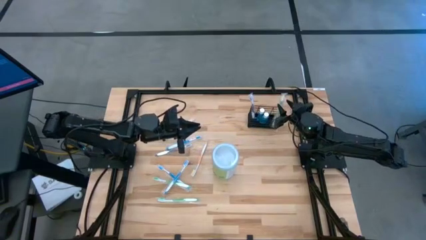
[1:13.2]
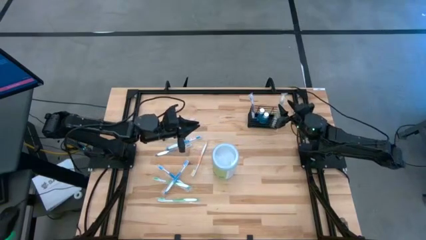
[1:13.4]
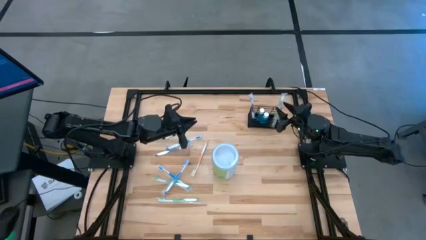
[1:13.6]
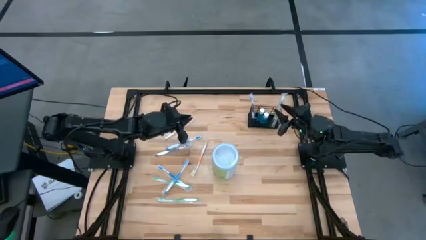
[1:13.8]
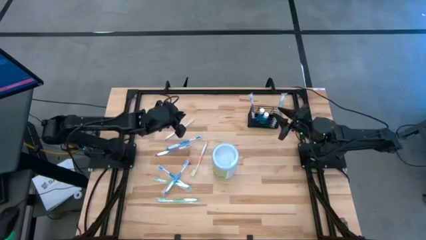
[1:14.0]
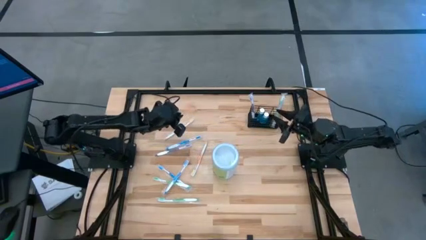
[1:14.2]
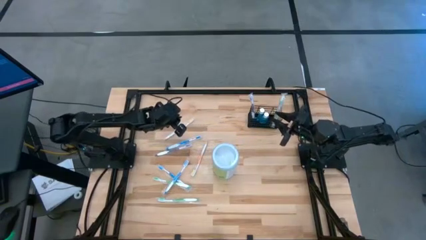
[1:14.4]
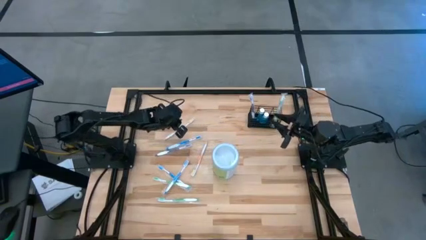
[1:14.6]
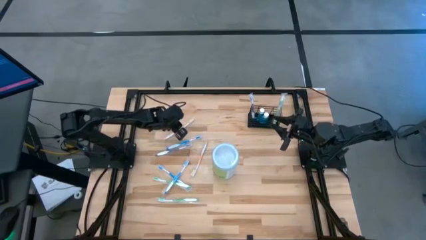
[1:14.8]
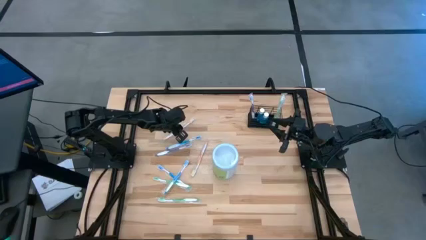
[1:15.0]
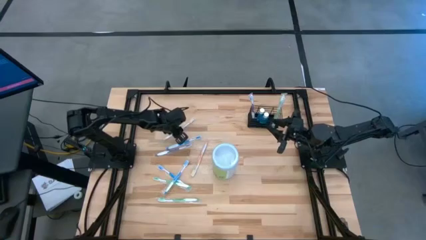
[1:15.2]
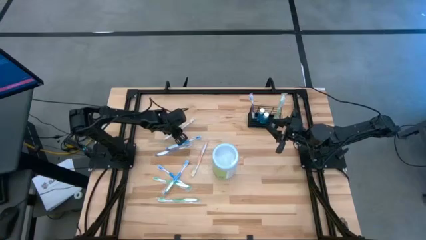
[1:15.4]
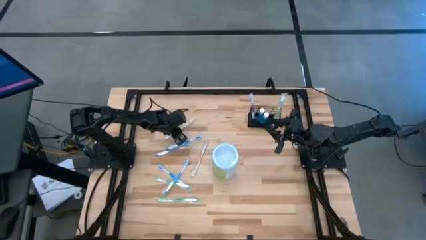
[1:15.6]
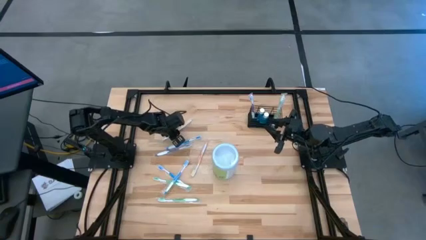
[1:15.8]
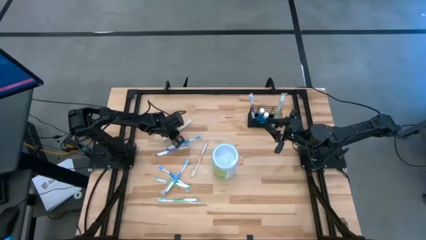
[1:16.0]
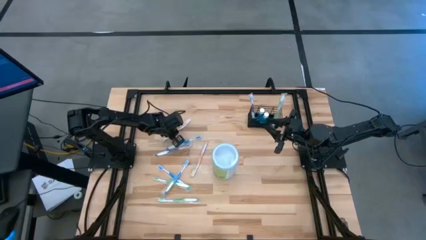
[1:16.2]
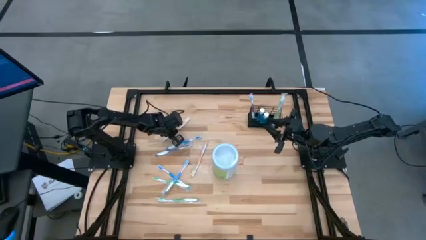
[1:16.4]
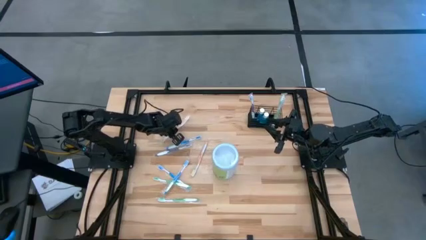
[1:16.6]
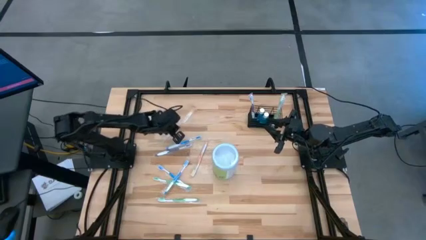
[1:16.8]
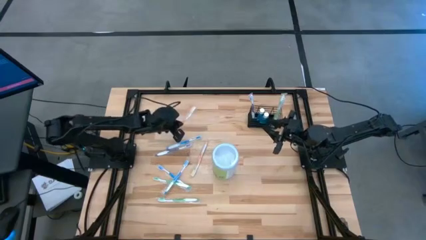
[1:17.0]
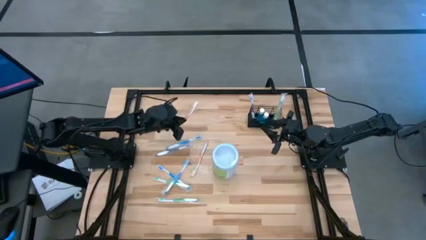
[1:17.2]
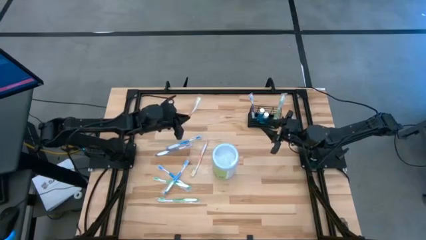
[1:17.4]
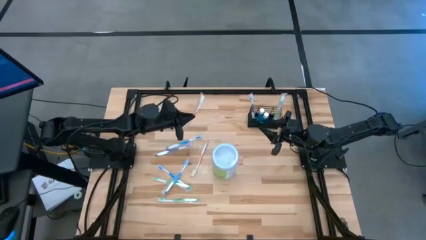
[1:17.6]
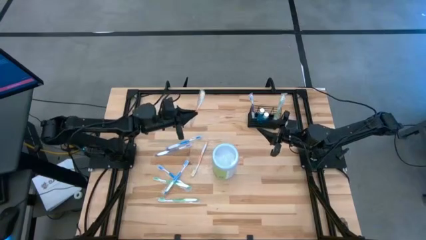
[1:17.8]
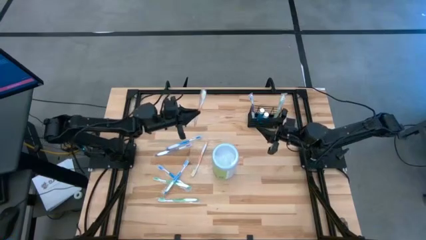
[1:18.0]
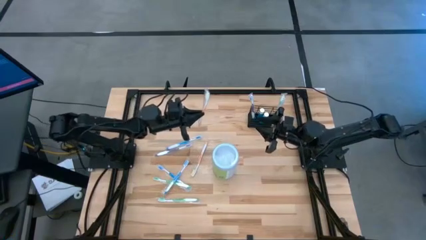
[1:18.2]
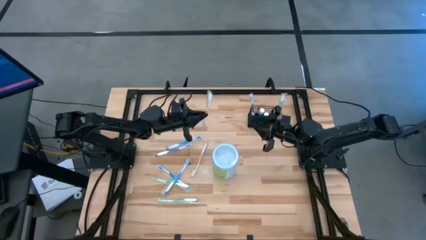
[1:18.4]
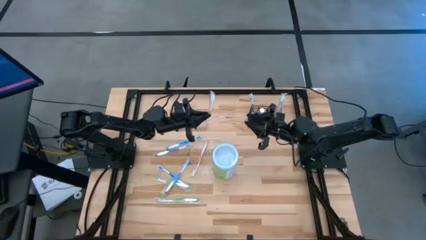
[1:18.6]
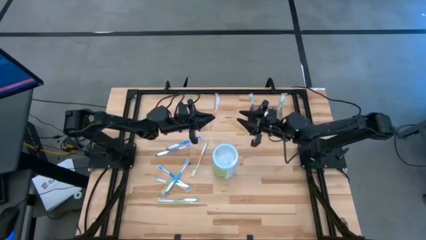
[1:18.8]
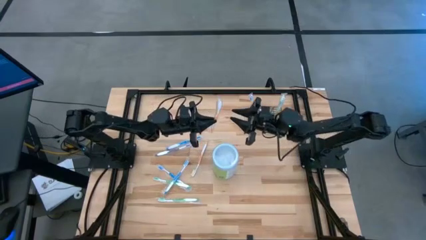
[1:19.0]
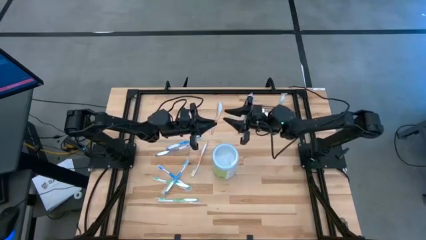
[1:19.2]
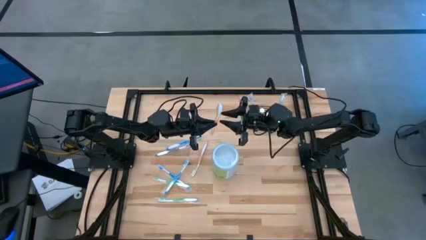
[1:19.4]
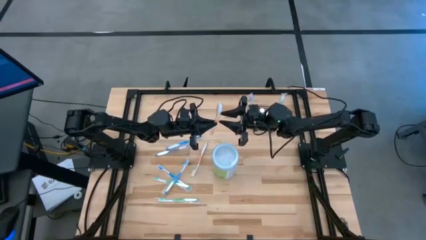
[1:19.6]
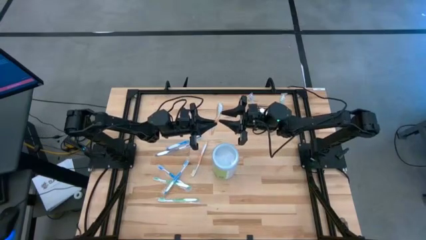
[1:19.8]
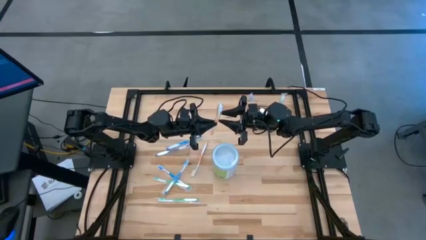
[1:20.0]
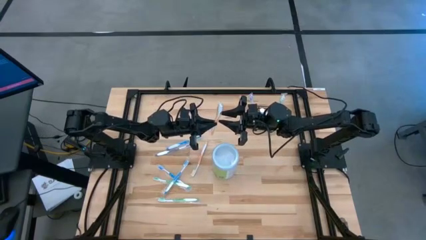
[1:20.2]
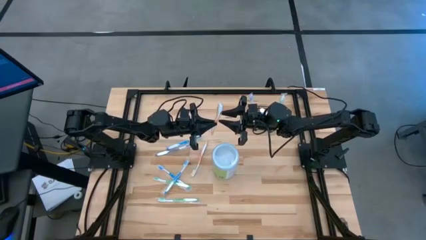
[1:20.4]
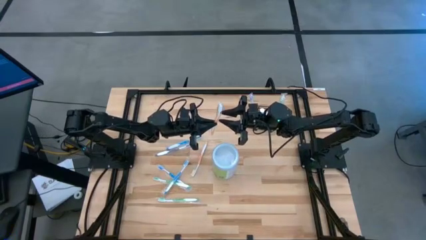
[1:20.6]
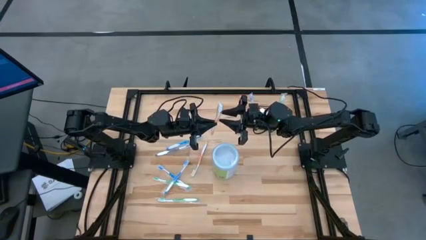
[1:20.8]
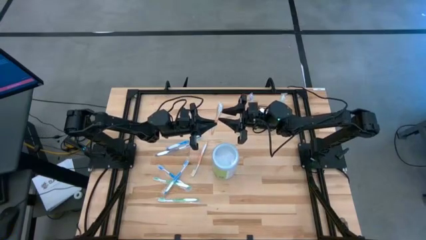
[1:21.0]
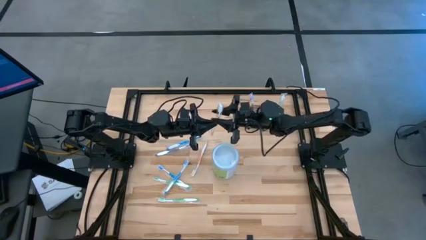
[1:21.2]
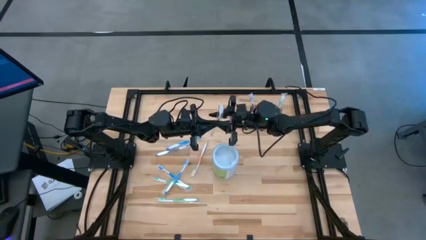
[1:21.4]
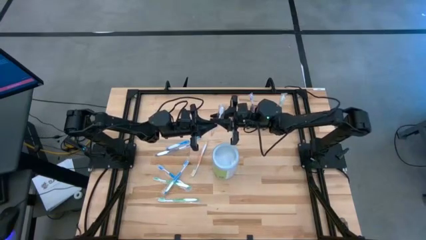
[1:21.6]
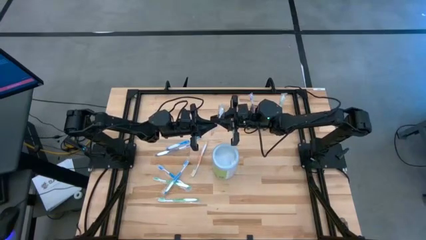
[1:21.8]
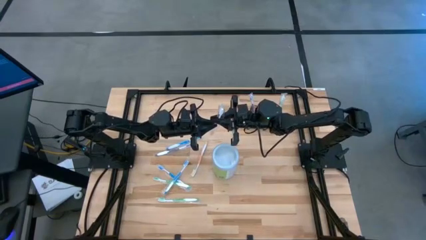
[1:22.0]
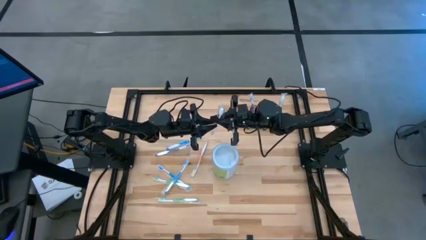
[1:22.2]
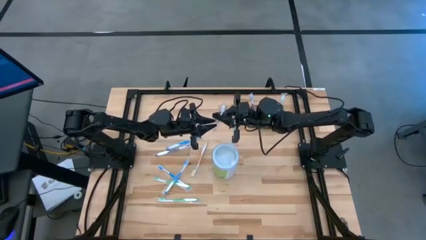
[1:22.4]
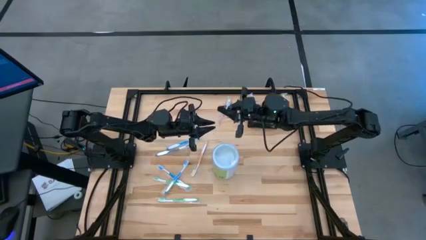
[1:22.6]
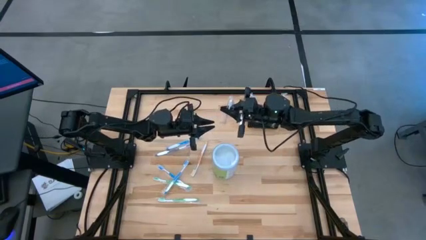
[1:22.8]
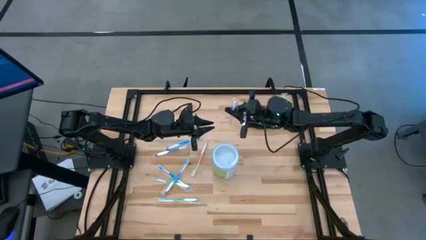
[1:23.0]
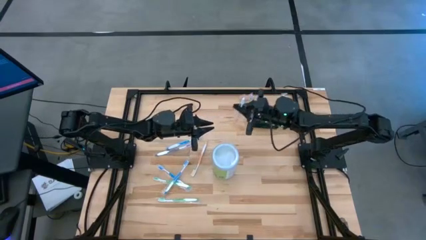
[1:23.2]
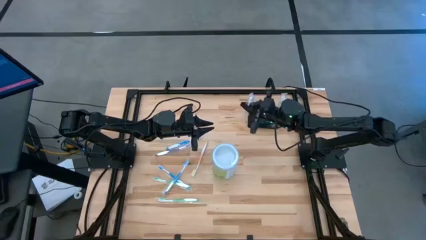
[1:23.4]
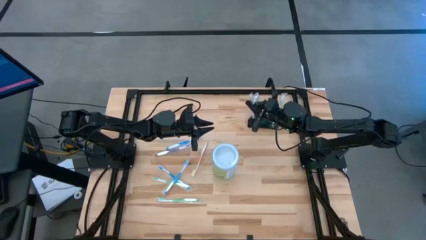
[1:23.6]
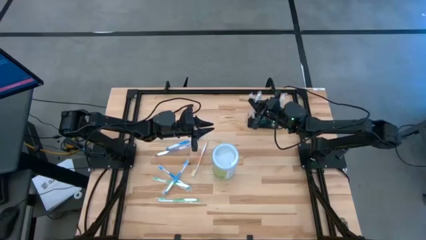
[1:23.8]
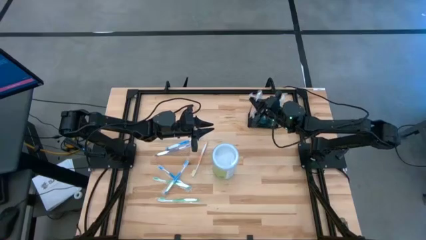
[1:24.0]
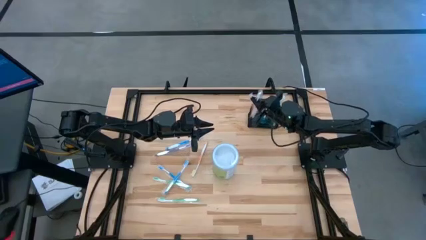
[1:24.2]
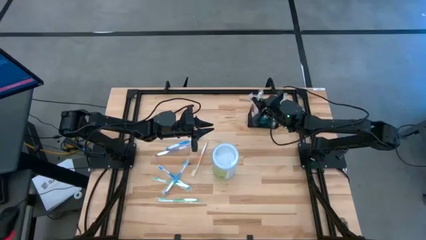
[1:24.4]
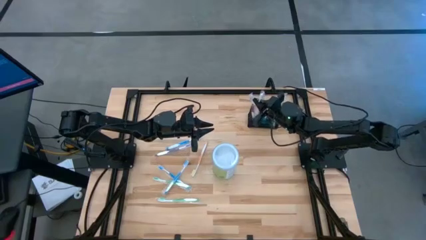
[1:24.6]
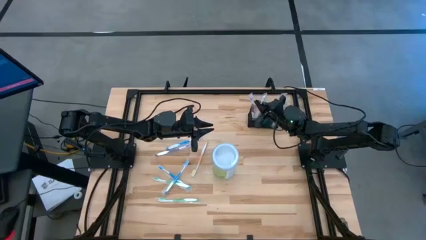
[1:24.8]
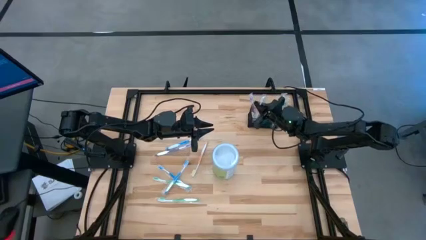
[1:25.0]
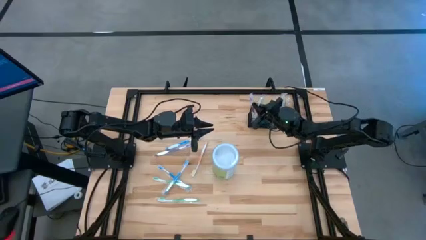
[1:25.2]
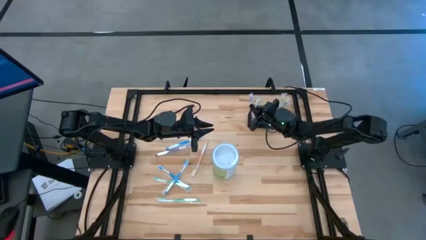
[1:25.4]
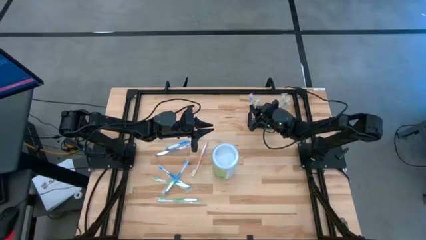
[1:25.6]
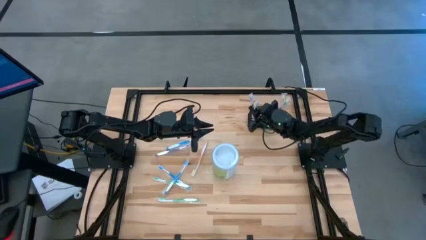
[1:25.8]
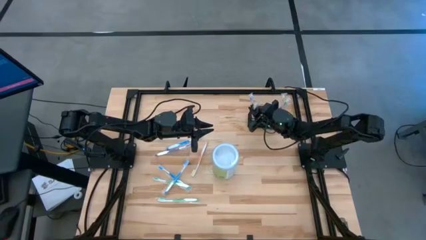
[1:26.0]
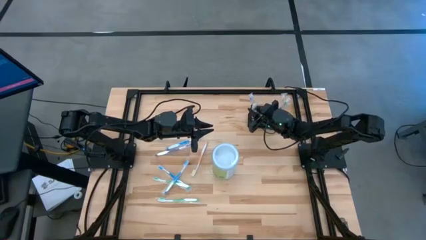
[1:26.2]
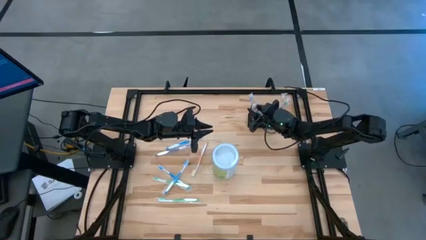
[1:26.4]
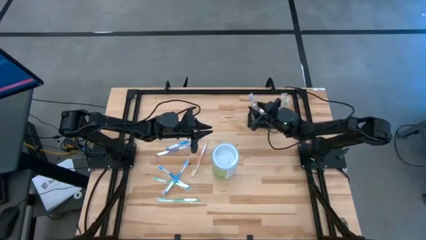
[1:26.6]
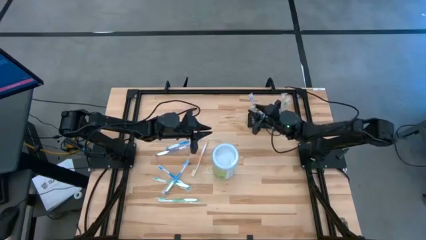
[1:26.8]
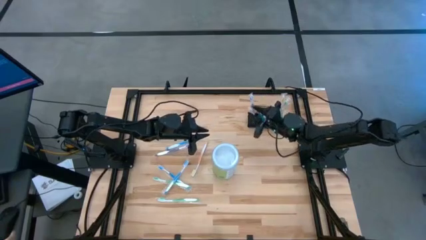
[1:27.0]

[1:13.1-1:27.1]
Task: Pick & Place toothbrushing station
Put the orange toothbrush into the wire organizer
